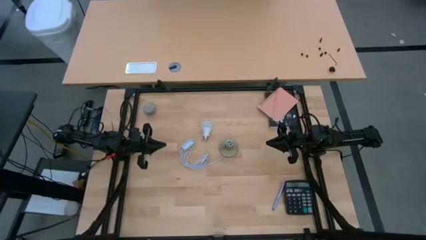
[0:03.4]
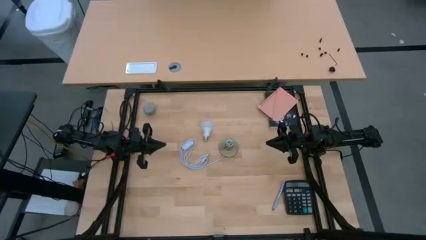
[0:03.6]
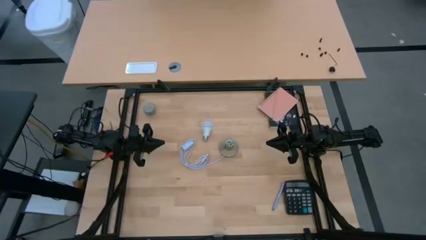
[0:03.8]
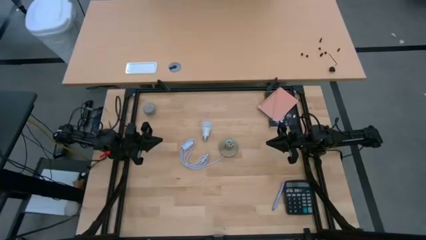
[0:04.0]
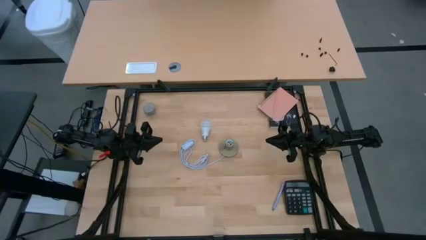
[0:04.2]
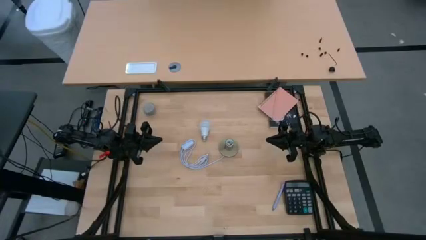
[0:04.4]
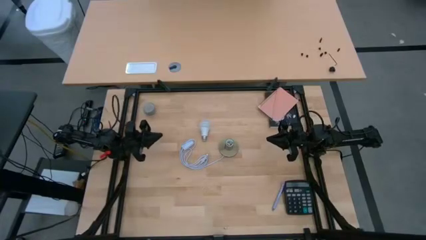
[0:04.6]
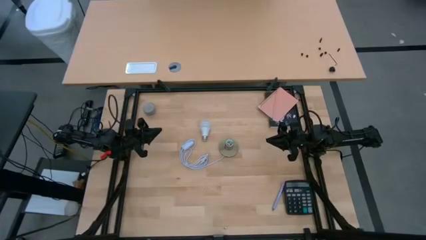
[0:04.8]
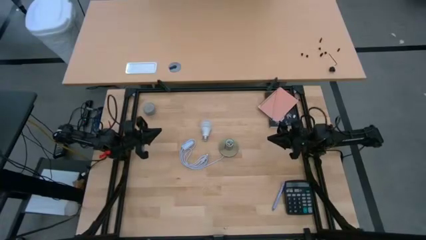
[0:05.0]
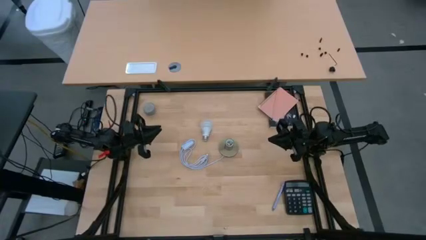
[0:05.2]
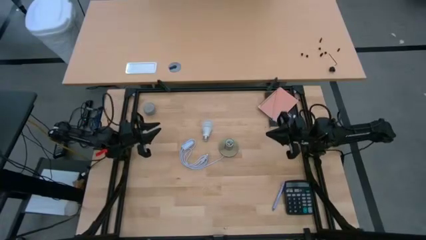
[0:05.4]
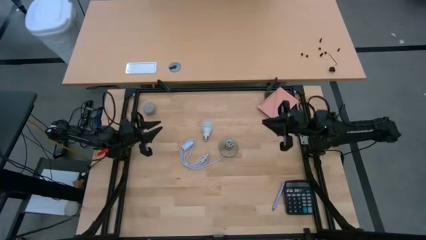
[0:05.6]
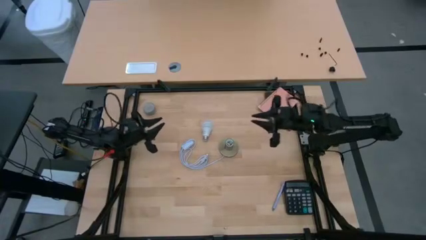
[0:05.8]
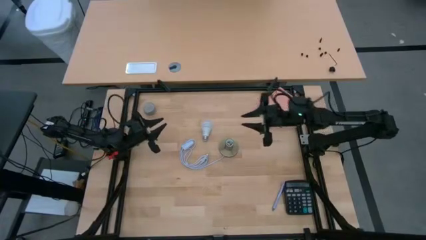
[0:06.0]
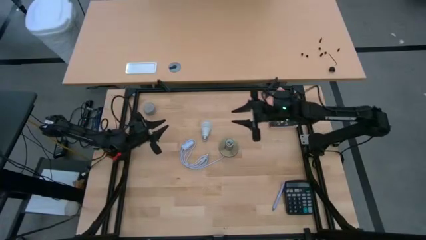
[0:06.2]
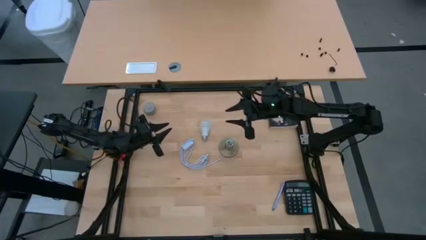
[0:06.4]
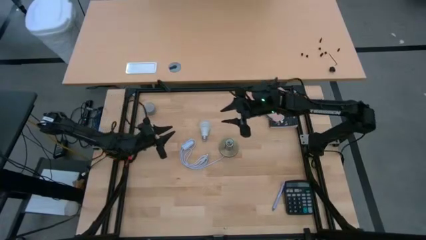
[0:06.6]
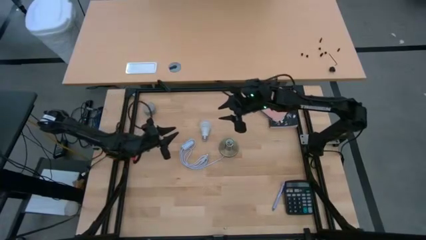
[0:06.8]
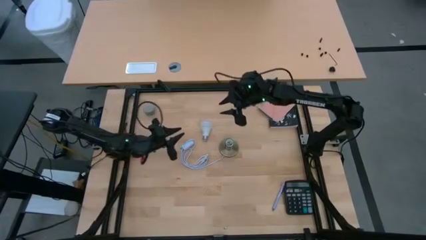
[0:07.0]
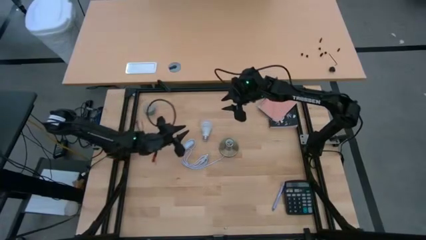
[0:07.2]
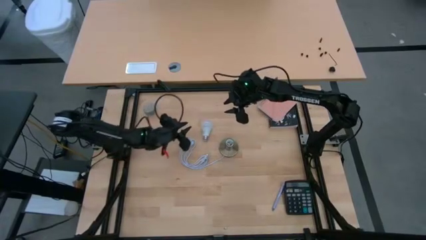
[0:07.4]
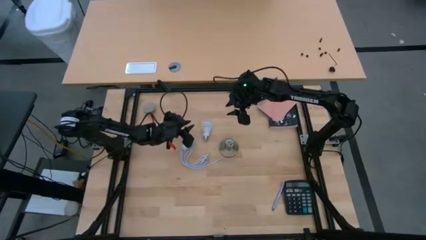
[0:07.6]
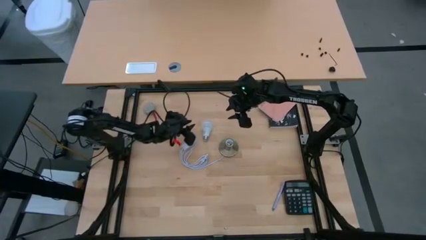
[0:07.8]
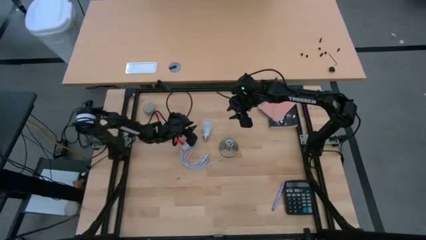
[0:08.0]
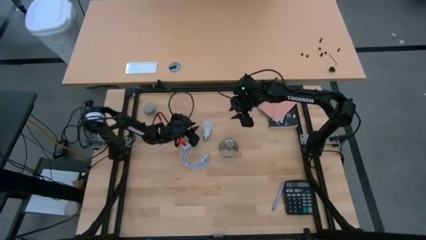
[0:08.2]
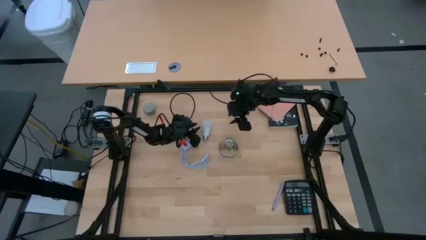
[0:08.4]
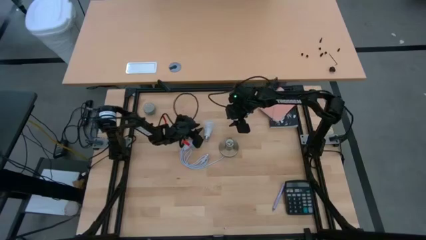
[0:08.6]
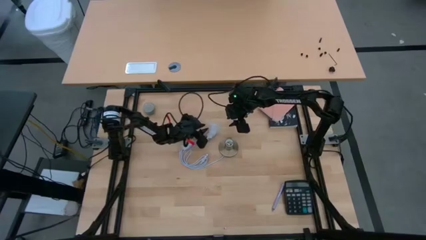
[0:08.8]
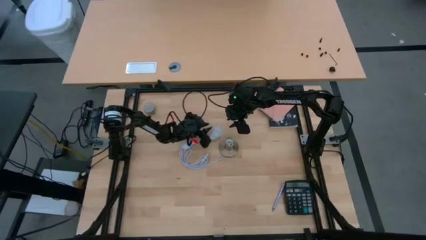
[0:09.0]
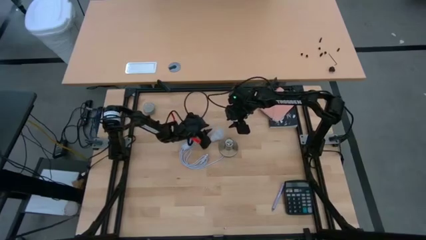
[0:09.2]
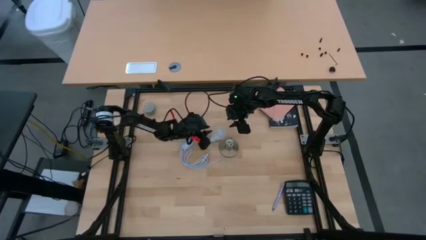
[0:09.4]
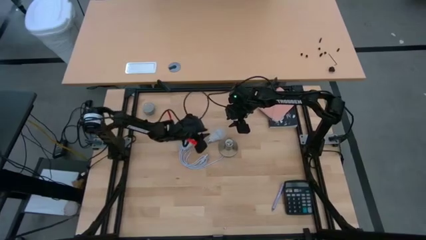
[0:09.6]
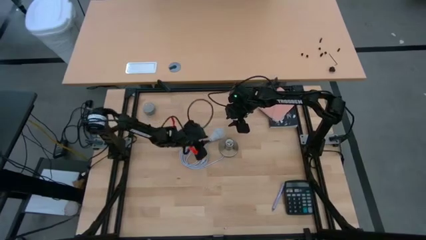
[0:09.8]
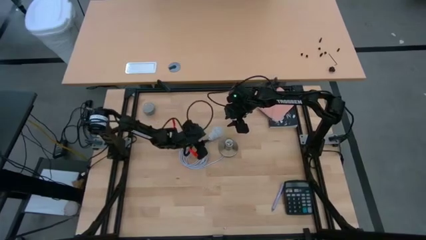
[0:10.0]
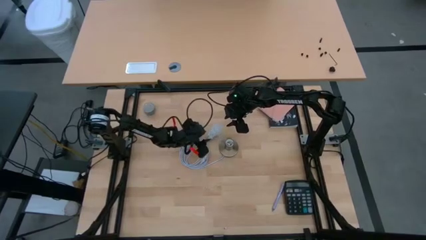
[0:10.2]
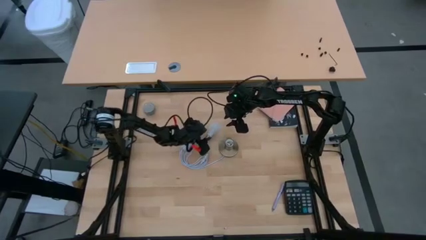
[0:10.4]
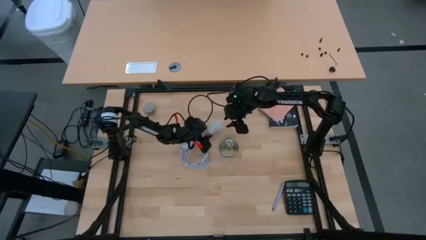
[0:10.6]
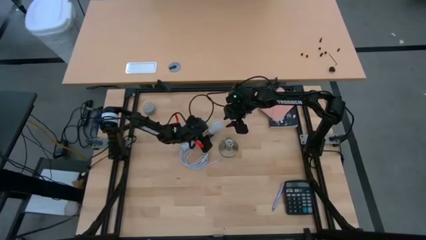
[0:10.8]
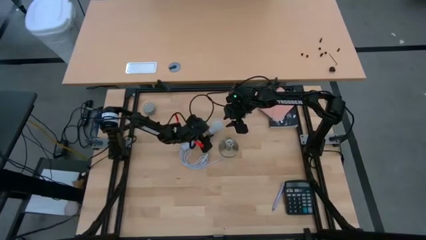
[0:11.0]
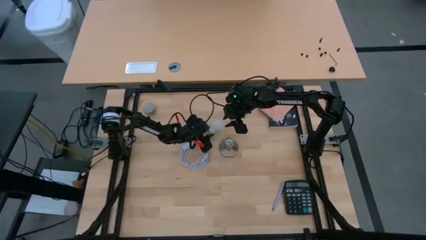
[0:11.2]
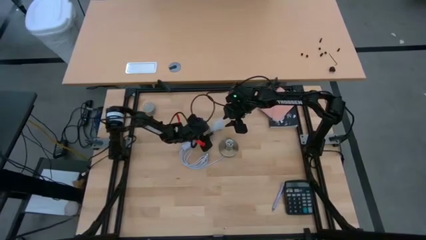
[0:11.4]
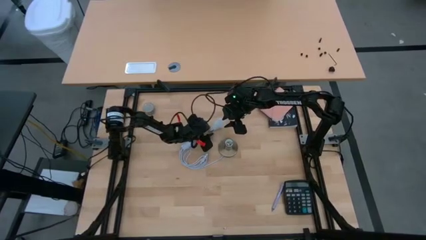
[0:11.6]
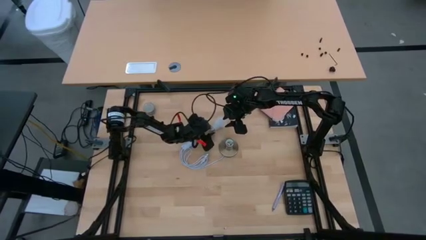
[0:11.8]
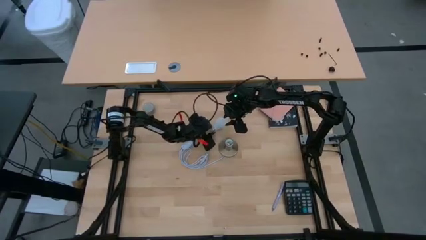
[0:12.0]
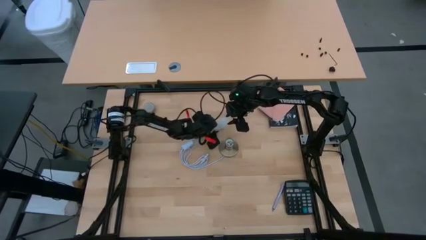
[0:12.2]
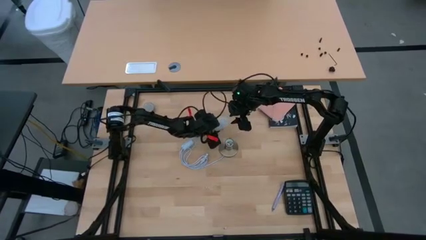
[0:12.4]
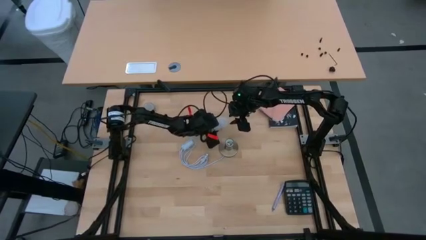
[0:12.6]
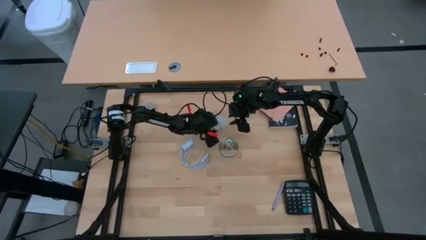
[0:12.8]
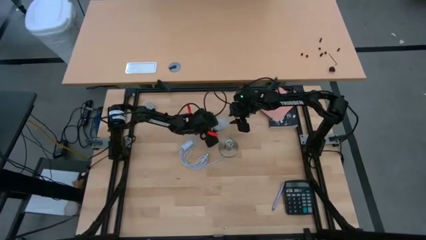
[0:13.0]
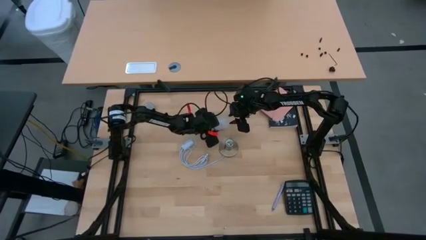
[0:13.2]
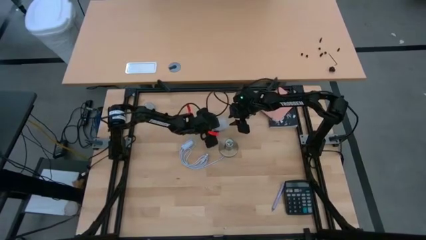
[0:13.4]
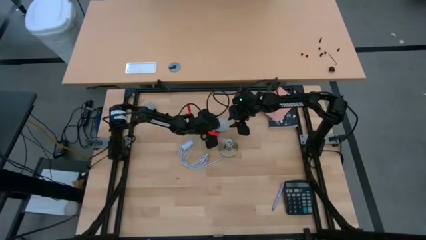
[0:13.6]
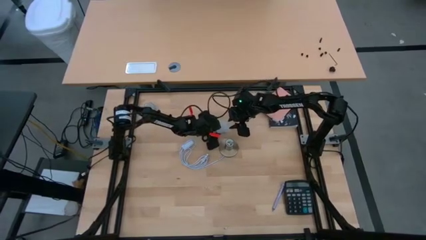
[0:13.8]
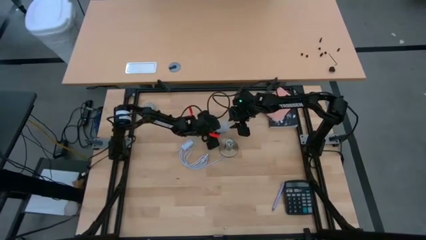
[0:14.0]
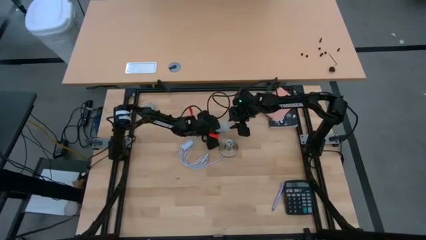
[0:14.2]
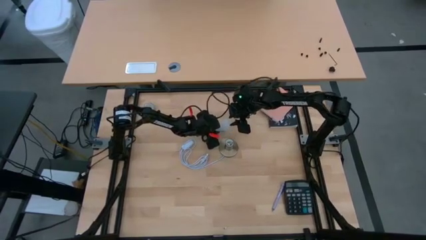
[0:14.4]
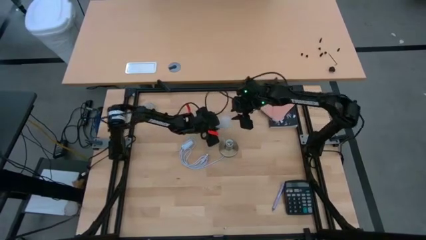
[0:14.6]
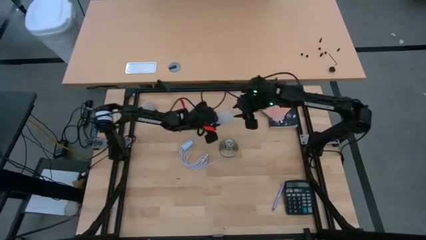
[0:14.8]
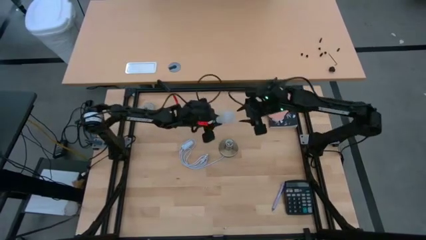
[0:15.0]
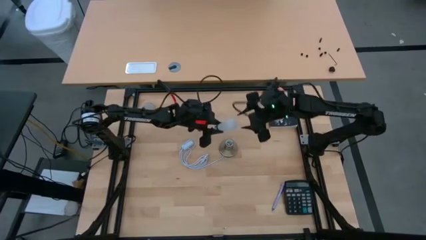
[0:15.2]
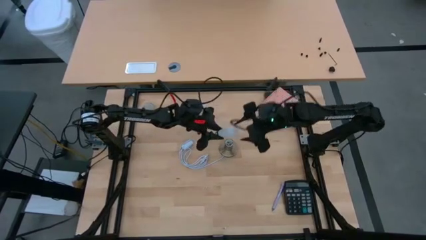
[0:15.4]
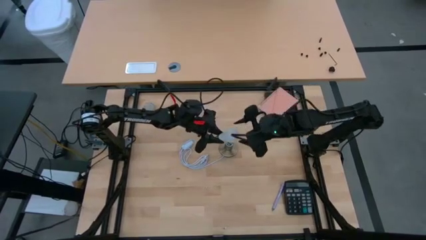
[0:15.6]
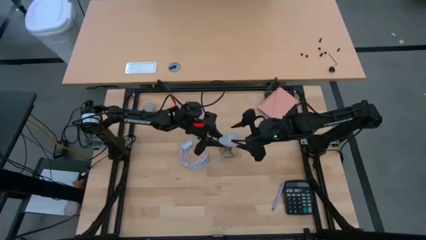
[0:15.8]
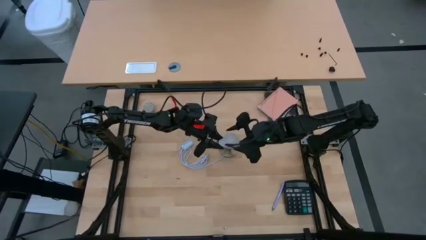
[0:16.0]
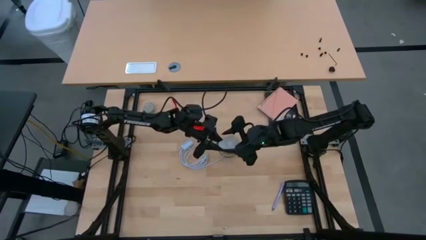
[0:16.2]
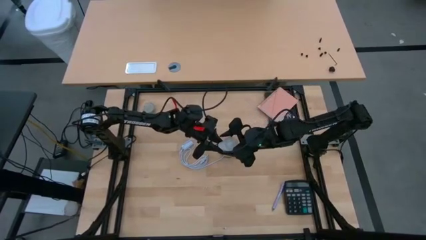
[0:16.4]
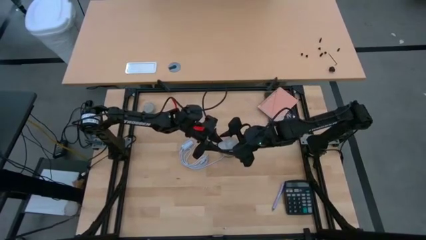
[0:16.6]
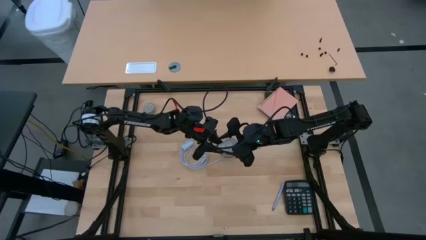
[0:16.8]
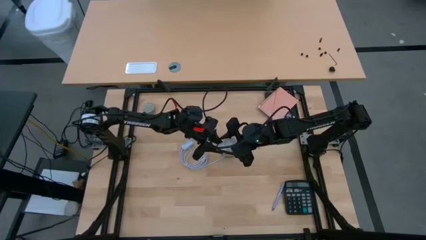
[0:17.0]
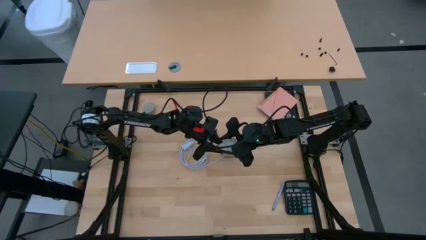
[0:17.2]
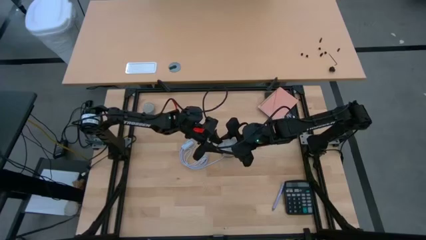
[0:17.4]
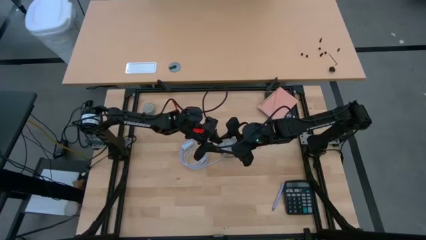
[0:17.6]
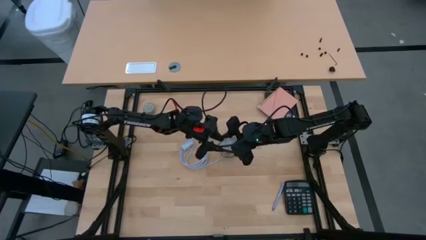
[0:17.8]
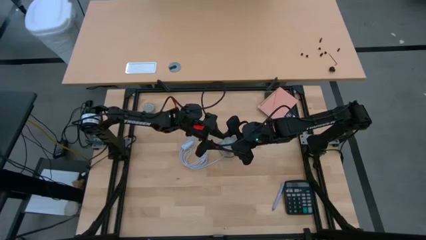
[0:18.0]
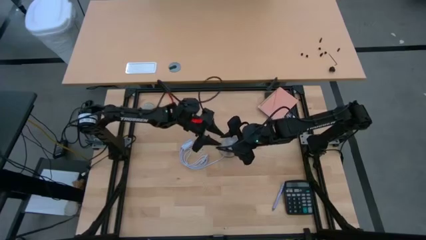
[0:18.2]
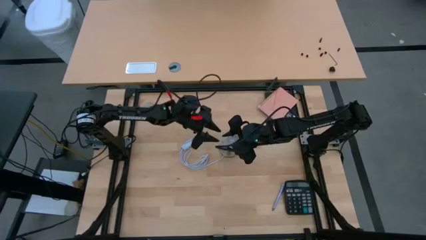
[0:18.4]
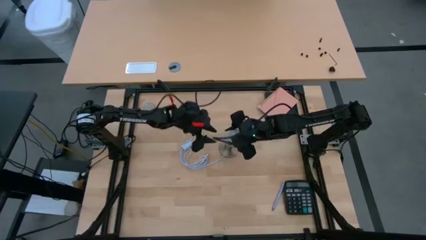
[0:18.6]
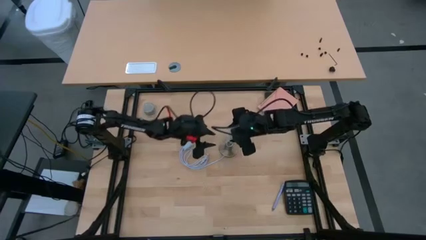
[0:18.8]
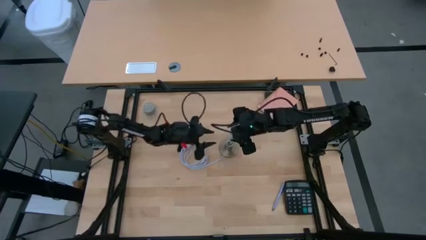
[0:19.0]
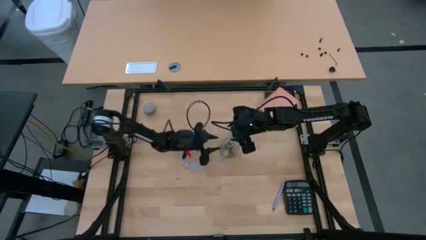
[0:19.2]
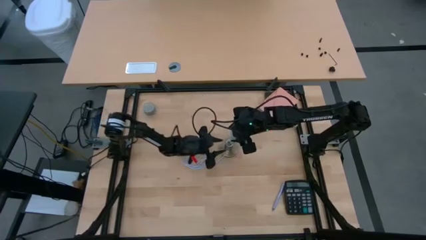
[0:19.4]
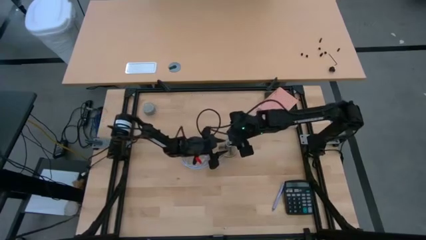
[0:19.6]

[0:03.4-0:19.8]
Task: Screw lightbulb
Insert the lightbulb into the lamp
